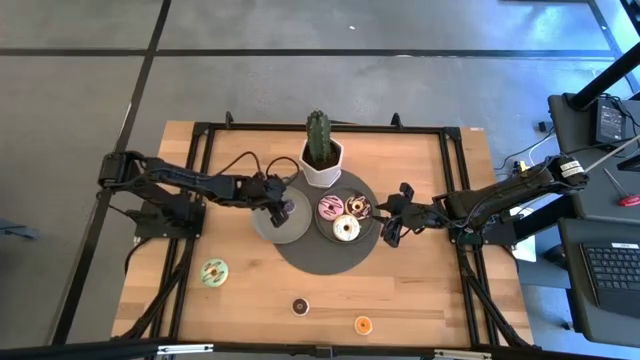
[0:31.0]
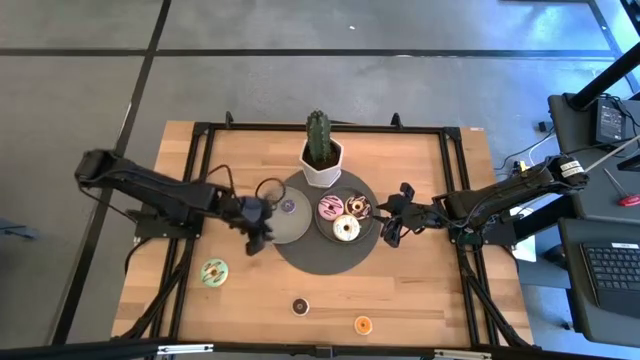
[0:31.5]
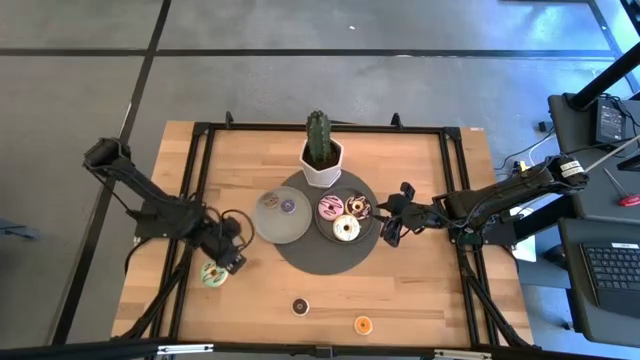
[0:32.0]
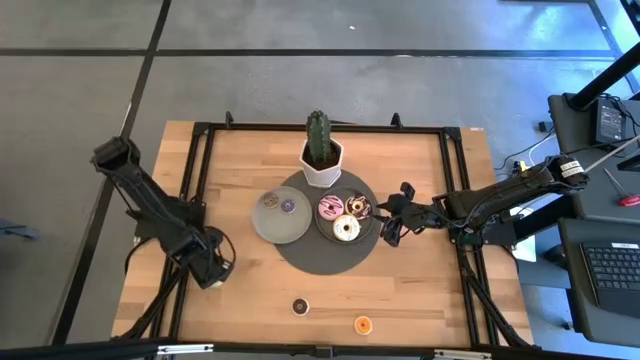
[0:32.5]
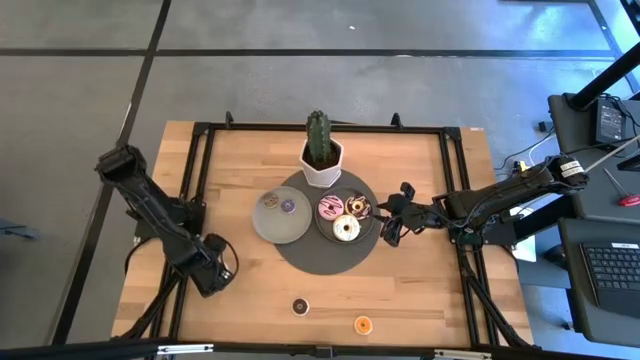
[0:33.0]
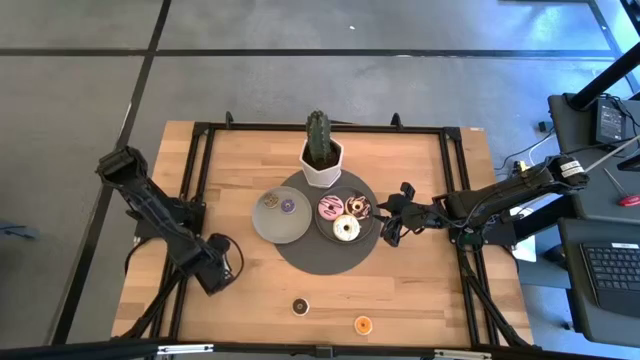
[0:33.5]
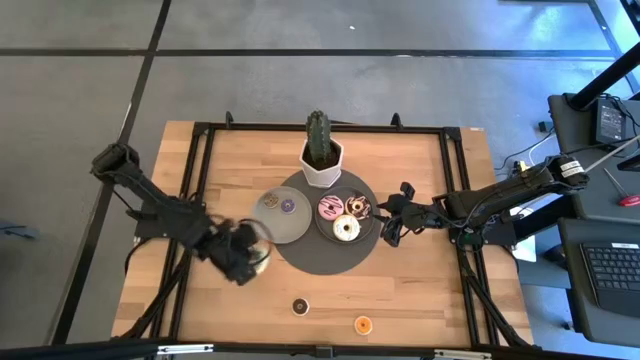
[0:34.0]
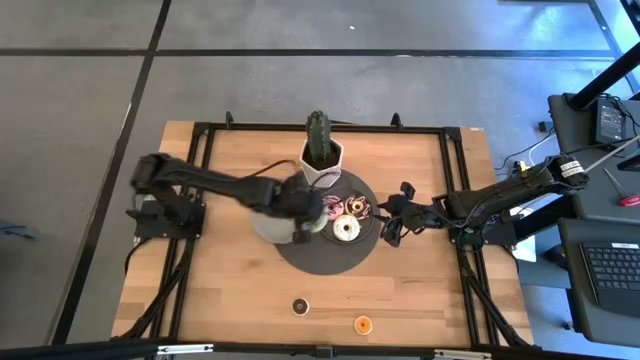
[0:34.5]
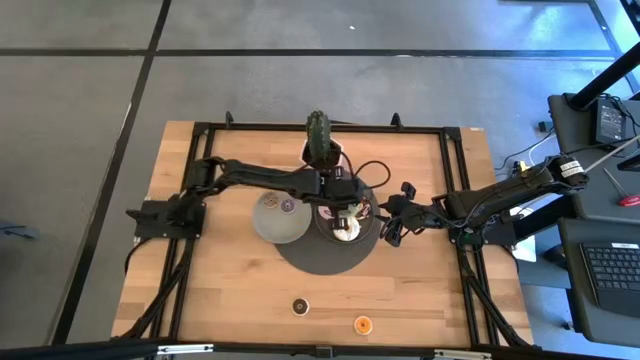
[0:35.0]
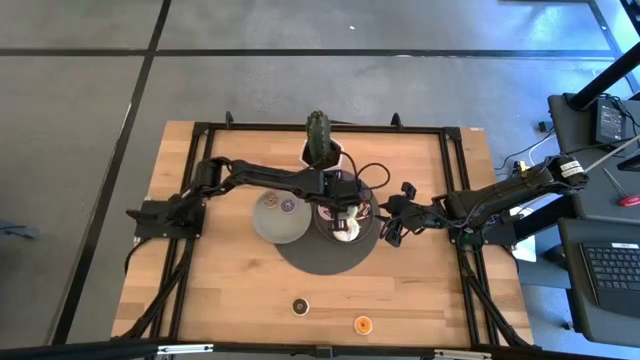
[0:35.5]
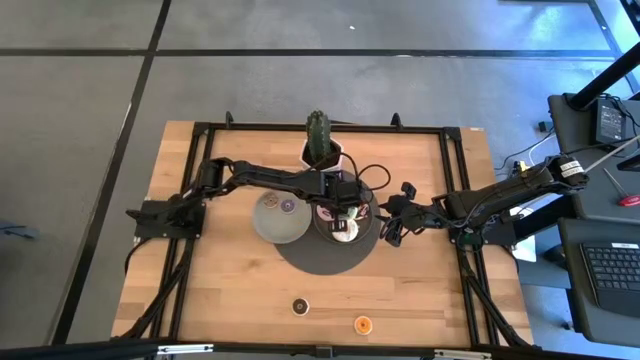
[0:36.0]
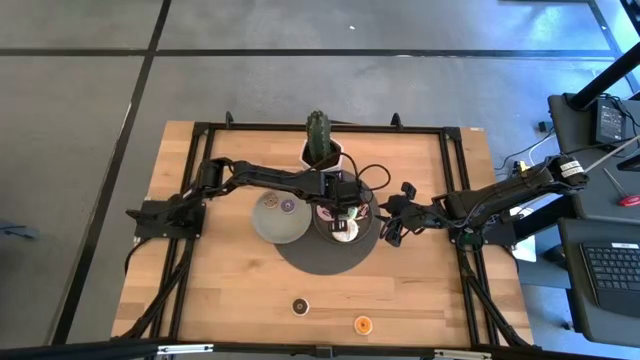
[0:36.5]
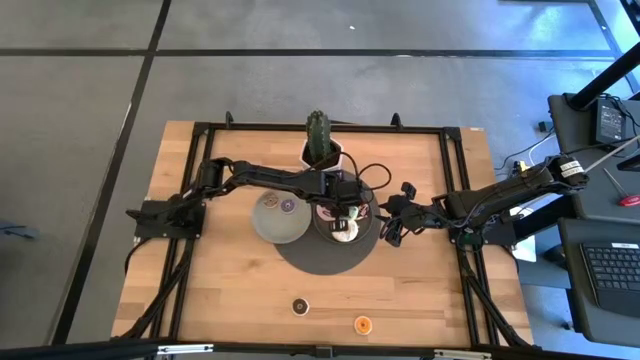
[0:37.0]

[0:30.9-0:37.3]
Task: Pick & Place donuts
Put the big light green donut on the dark gray plate

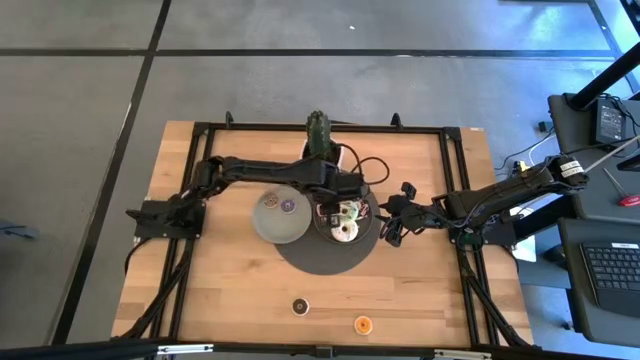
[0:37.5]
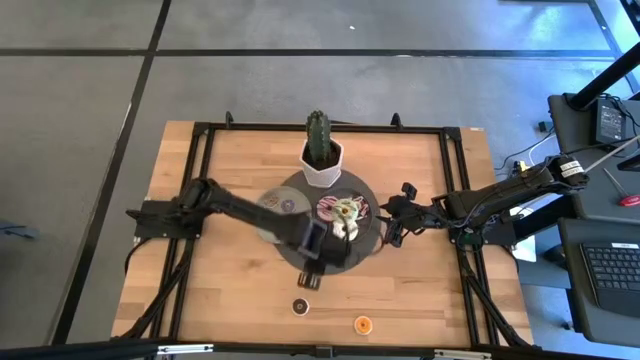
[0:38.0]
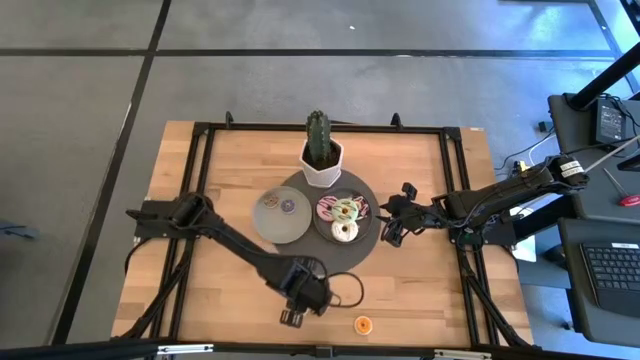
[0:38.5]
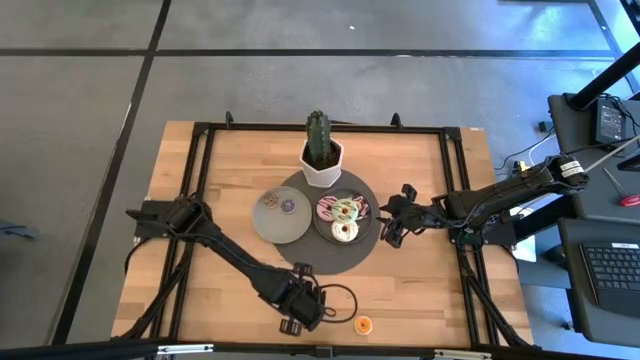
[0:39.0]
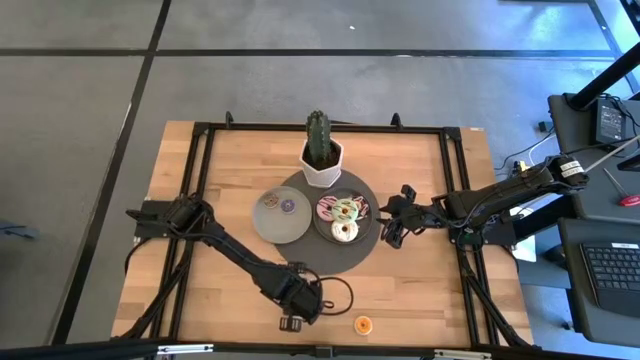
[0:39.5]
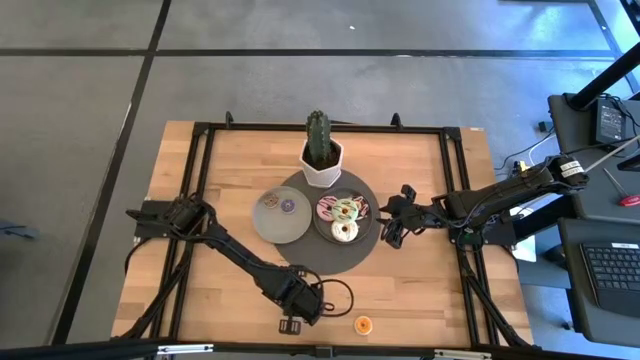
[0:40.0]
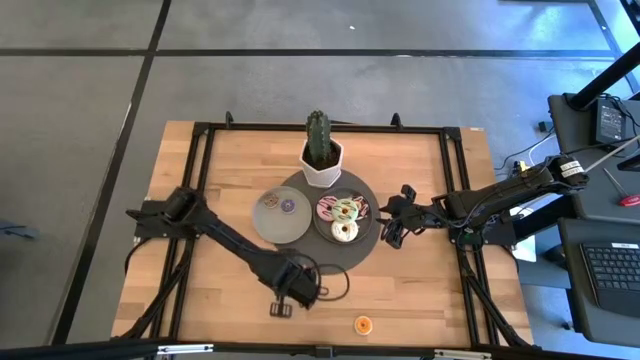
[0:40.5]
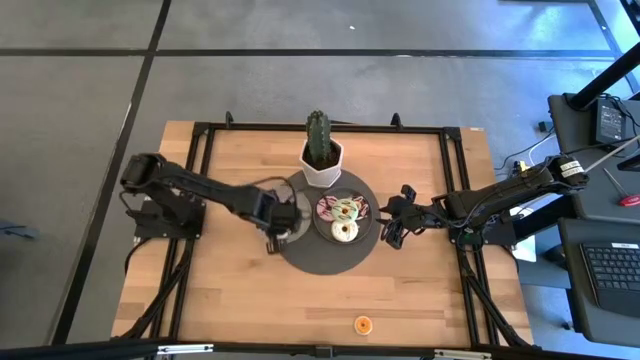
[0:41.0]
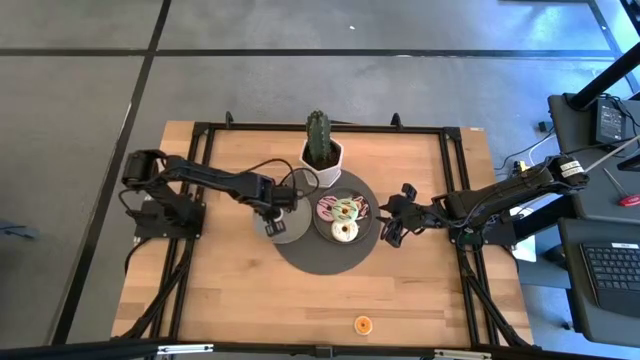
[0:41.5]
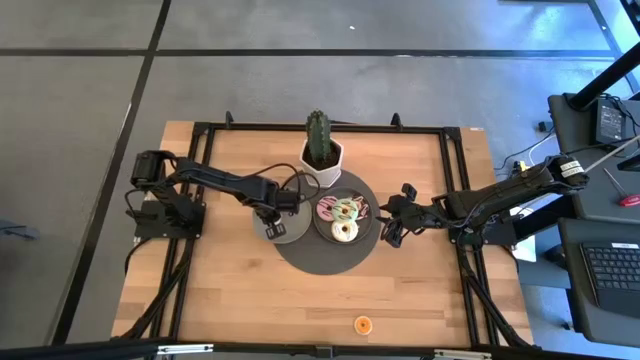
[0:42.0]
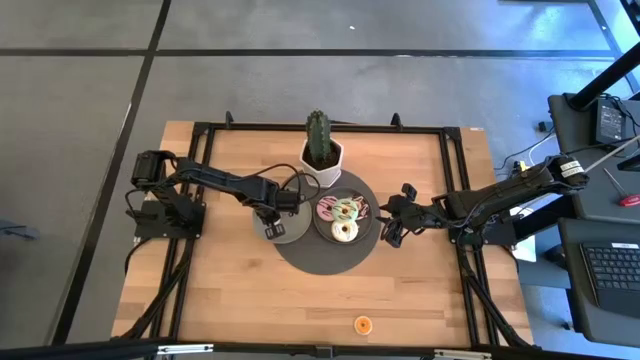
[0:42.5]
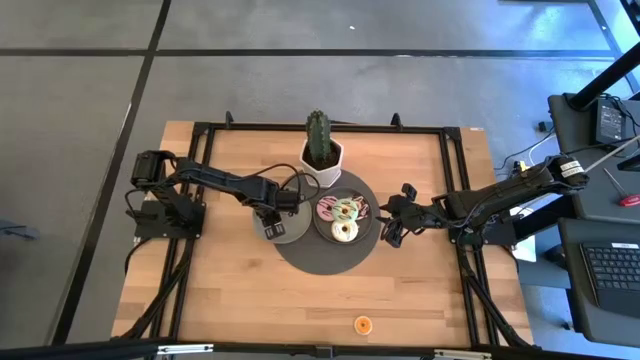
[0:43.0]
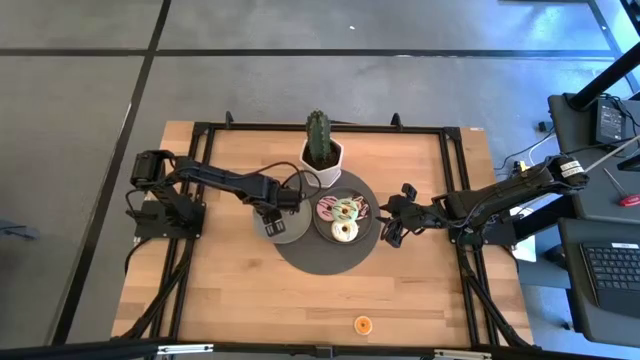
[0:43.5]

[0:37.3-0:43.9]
Put the small brown donut on the light gray plate

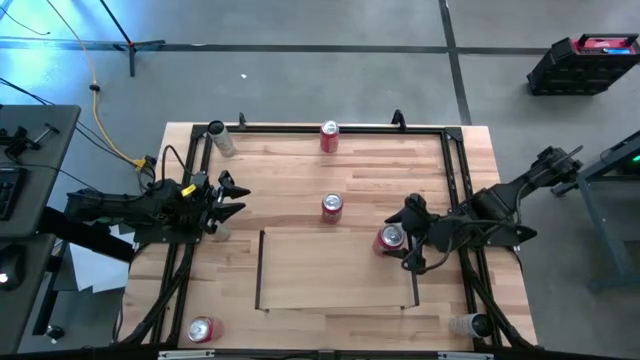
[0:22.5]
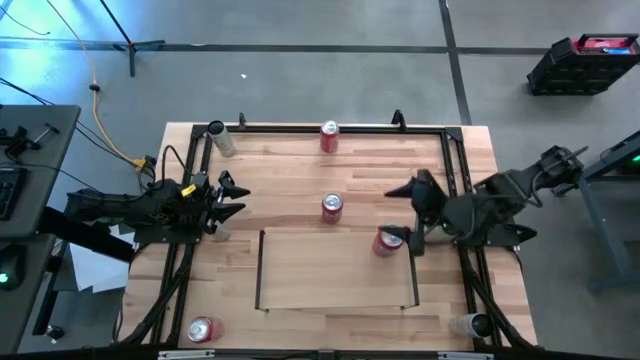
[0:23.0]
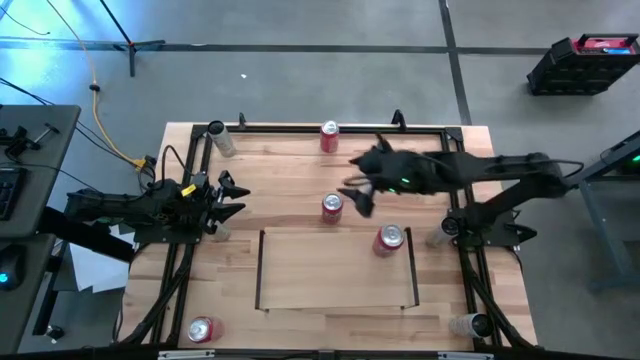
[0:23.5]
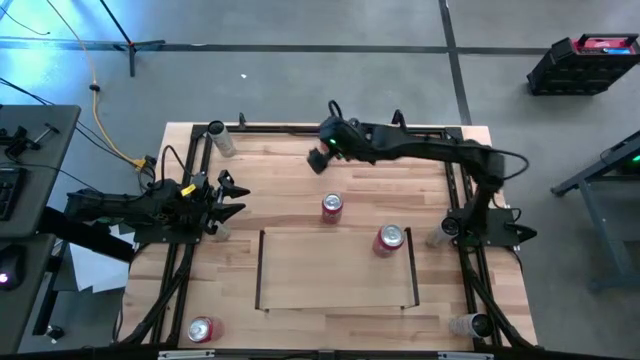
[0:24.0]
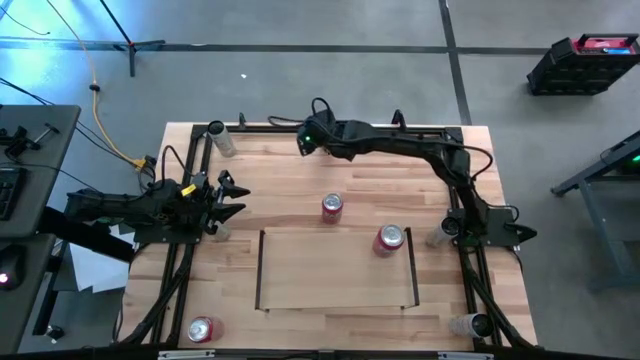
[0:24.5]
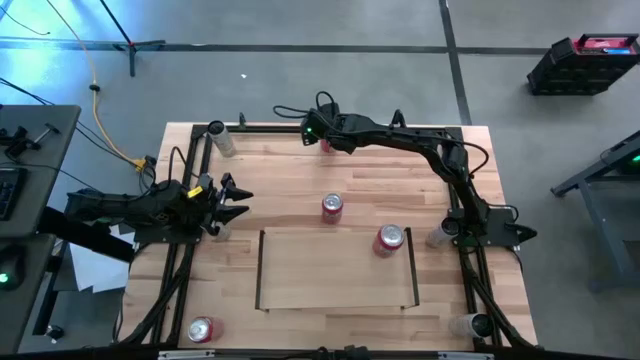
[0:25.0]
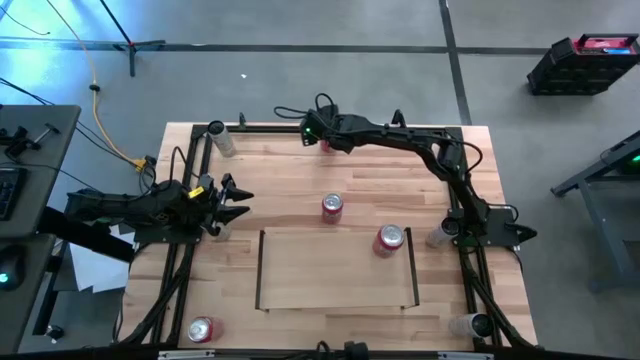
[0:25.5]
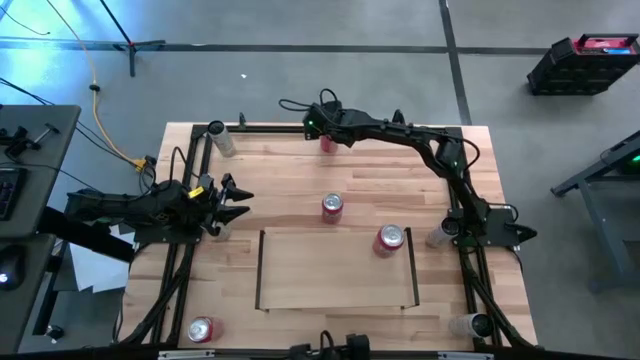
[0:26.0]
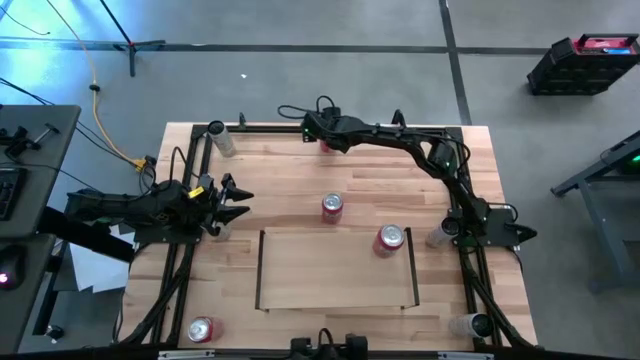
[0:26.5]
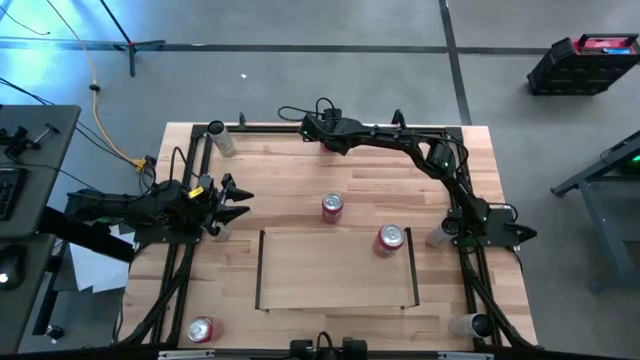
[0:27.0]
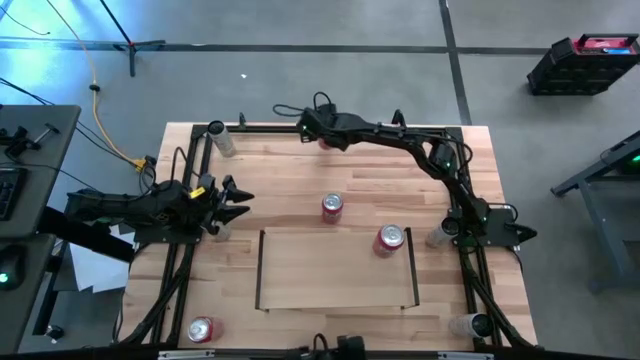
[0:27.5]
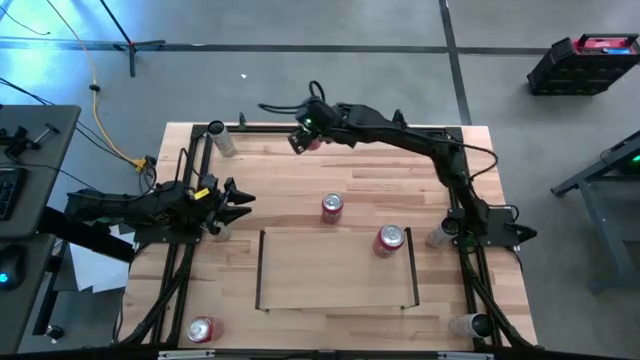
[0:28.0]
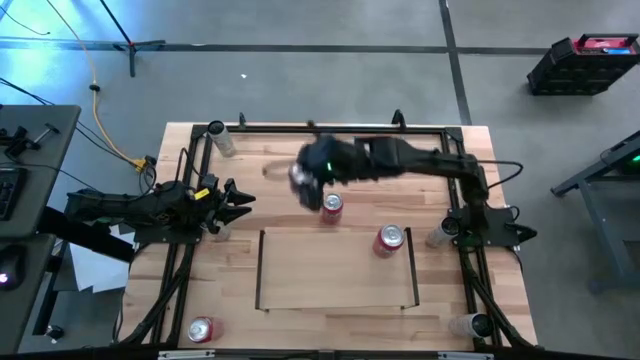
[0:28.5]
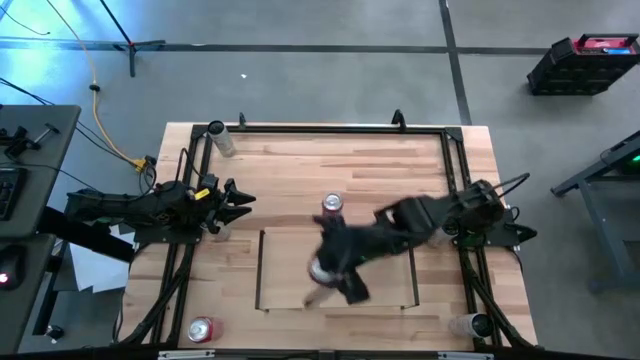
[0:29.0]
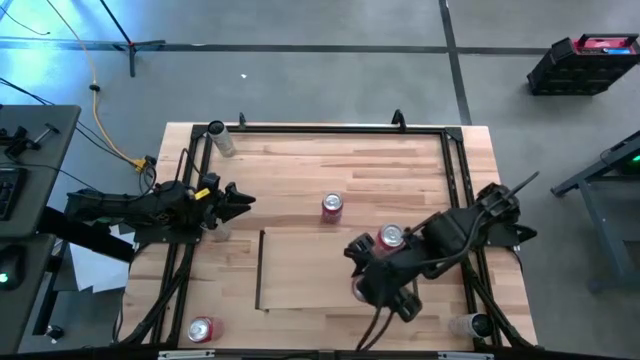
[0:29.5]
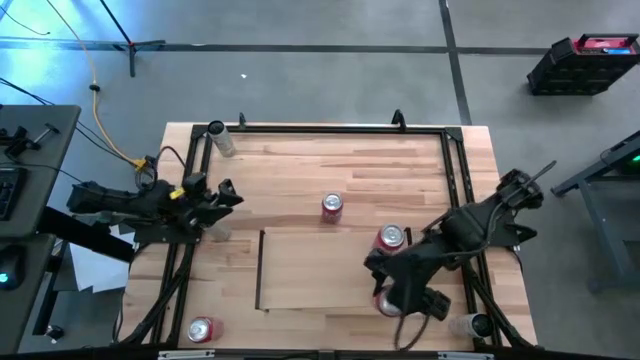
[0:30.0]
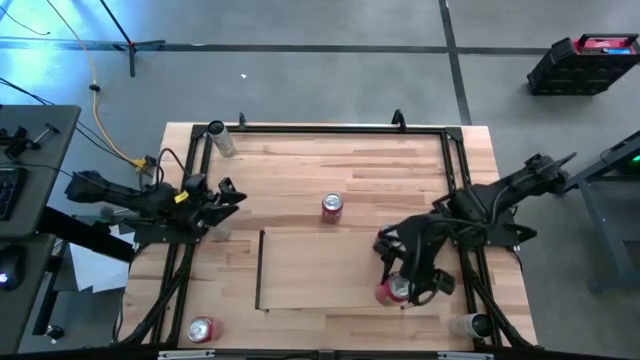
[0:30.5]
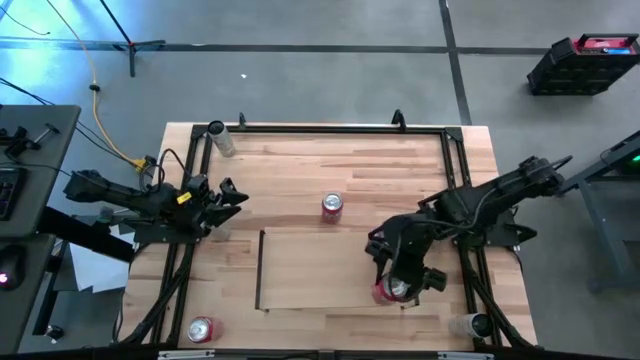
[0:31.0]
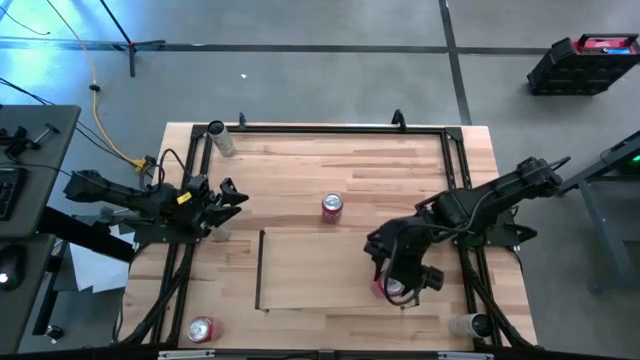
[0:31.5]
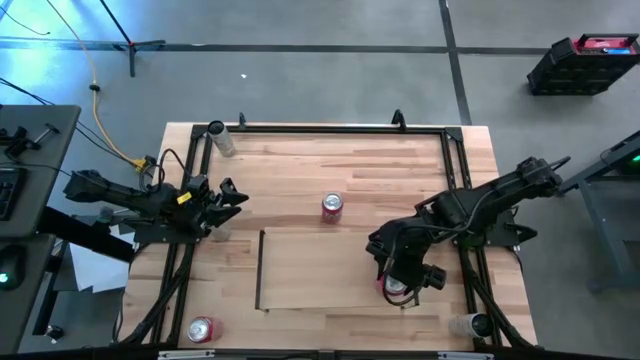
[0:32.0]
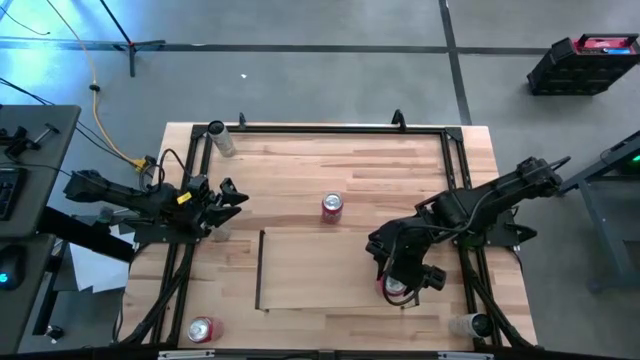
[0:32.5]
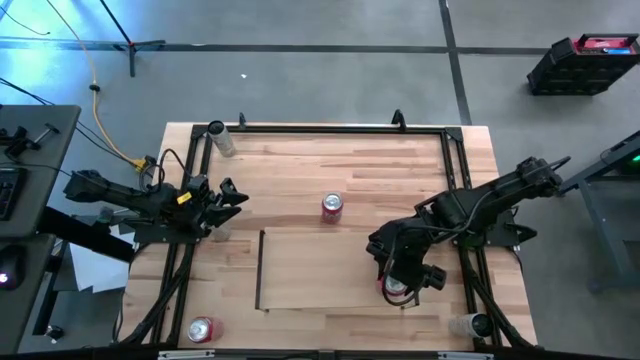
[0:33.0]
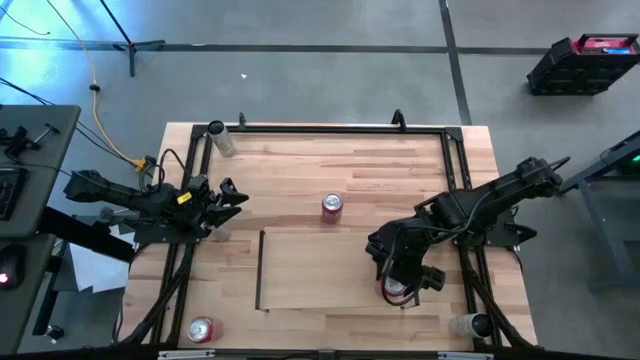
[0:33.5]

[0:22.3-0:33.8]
Task: Place canned beverage on shelf
Put the top red soda can on the shelf
